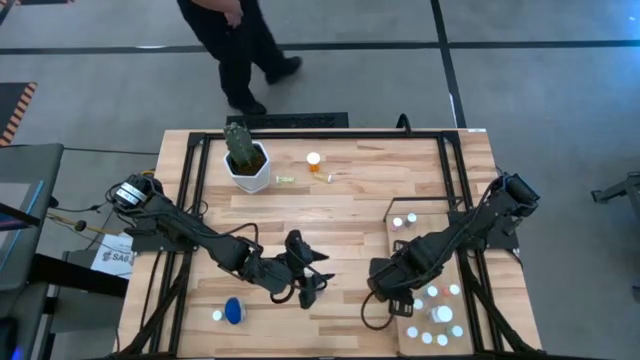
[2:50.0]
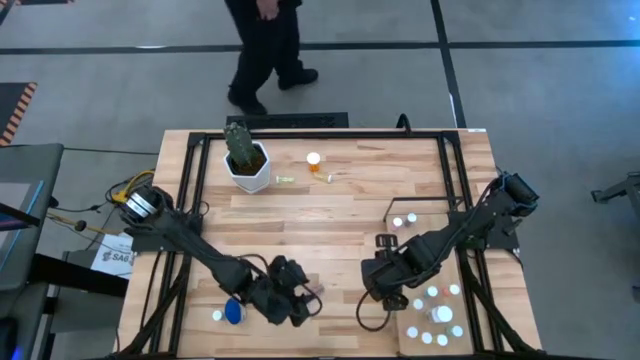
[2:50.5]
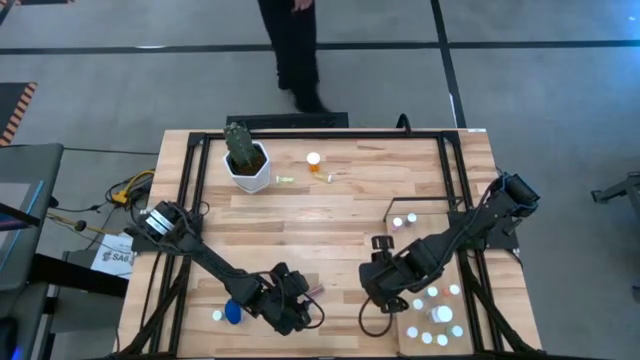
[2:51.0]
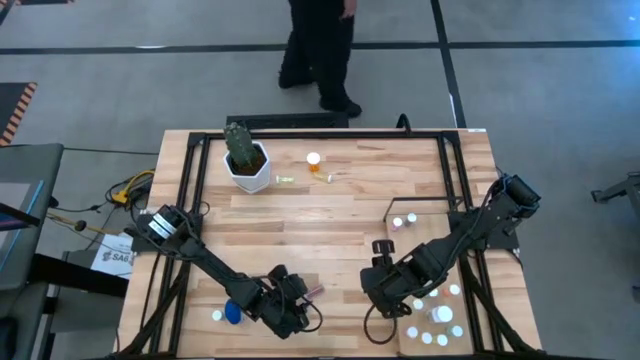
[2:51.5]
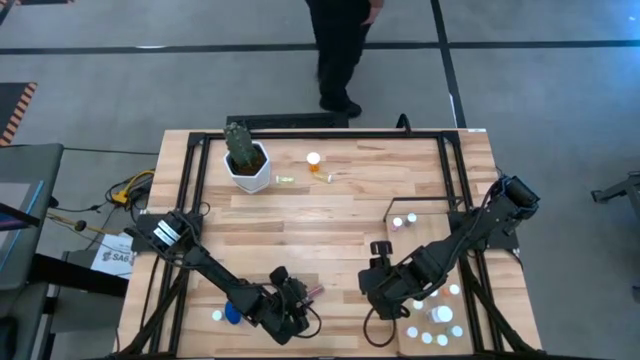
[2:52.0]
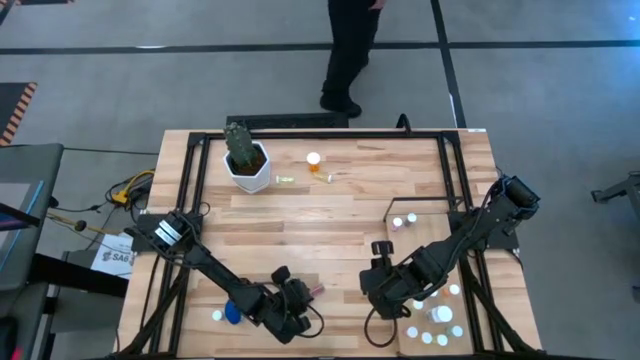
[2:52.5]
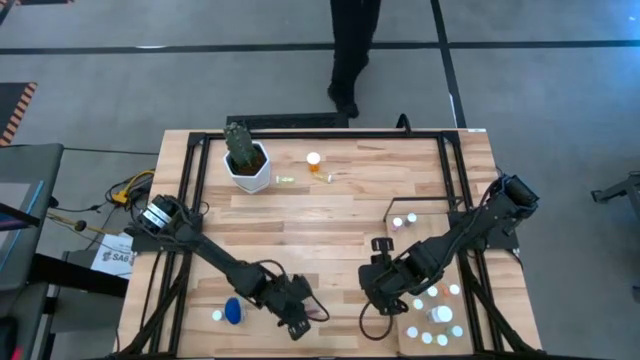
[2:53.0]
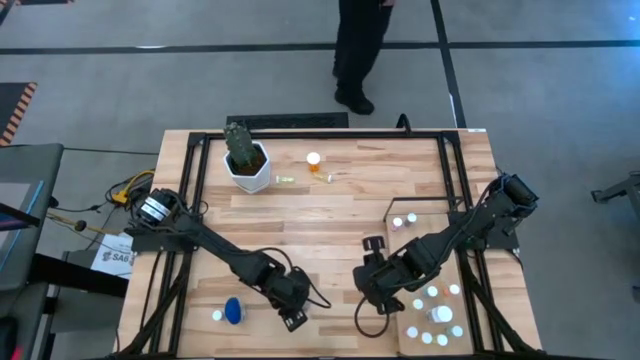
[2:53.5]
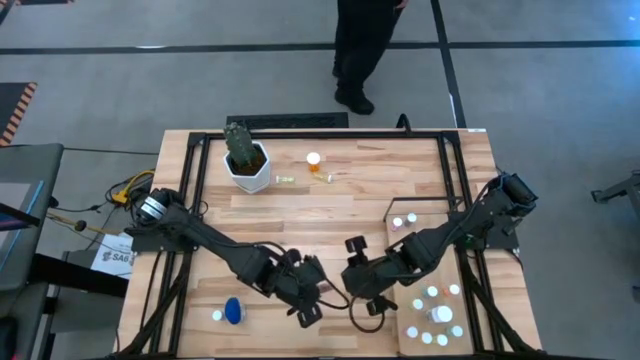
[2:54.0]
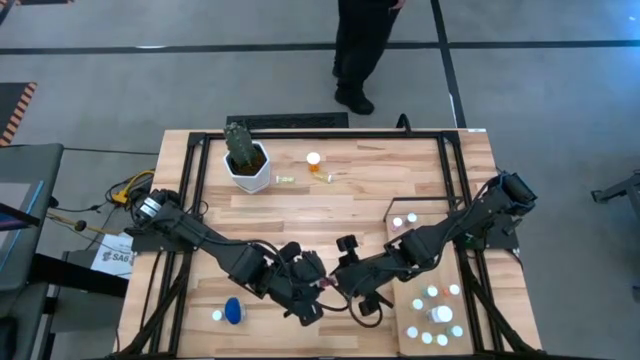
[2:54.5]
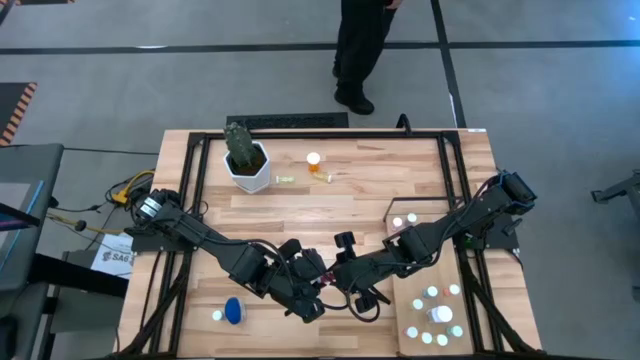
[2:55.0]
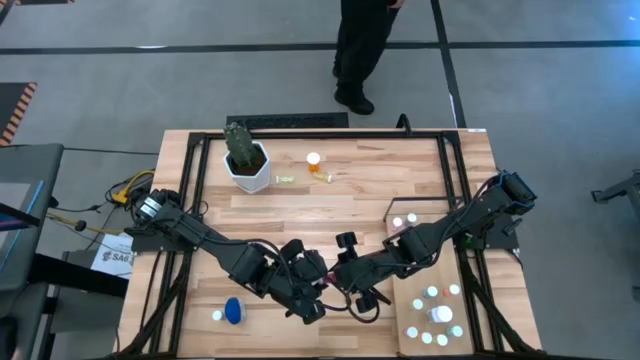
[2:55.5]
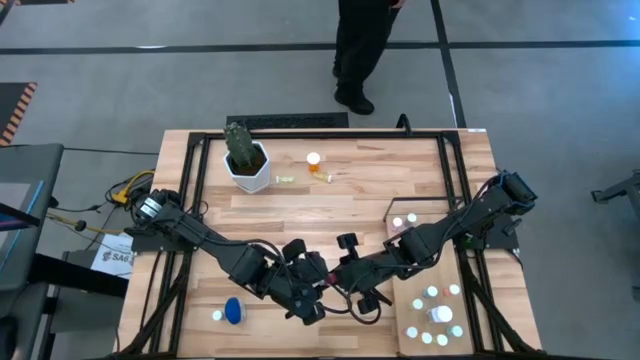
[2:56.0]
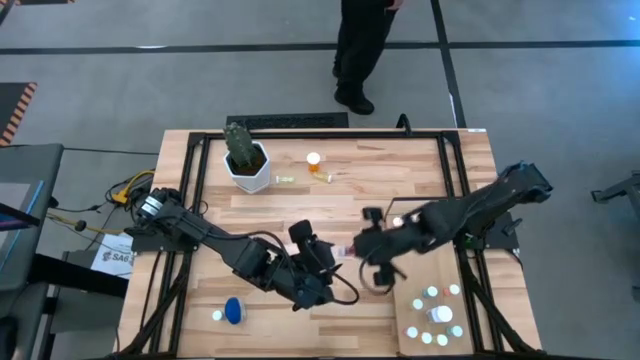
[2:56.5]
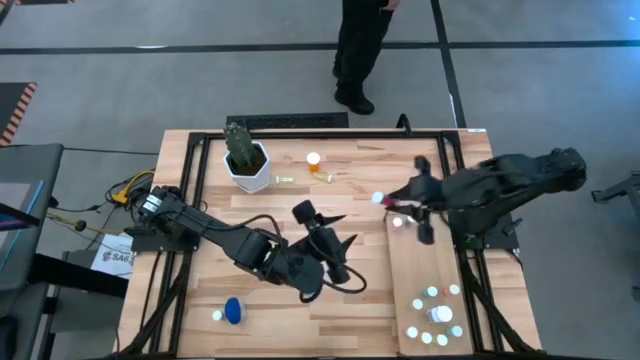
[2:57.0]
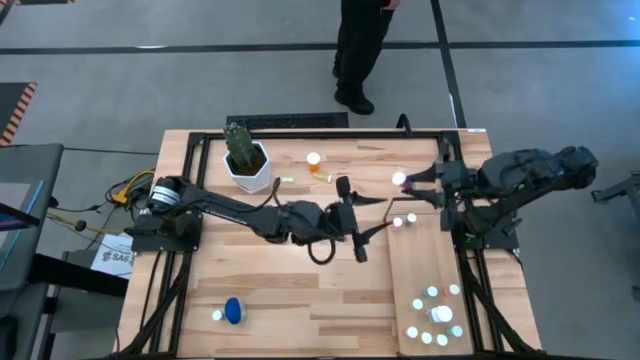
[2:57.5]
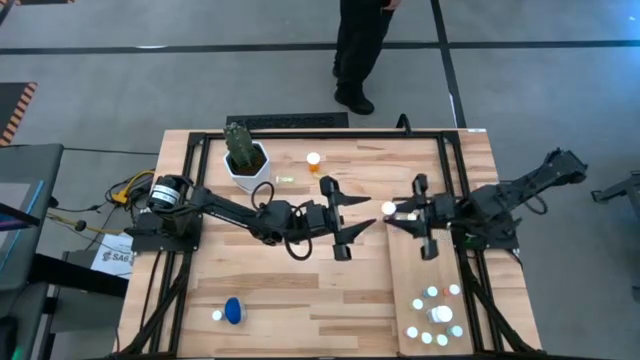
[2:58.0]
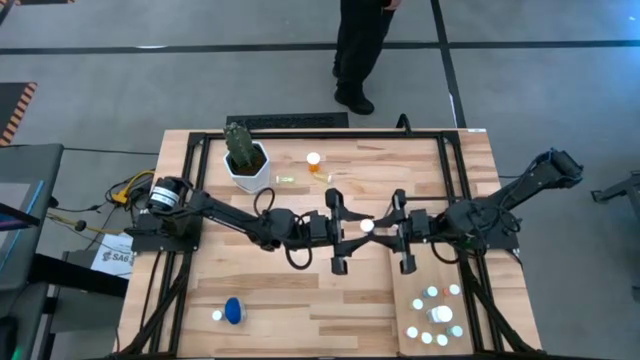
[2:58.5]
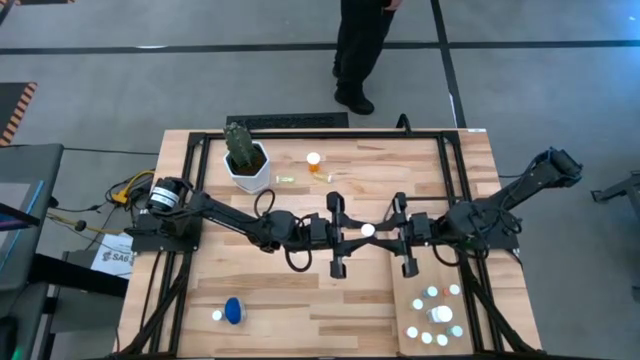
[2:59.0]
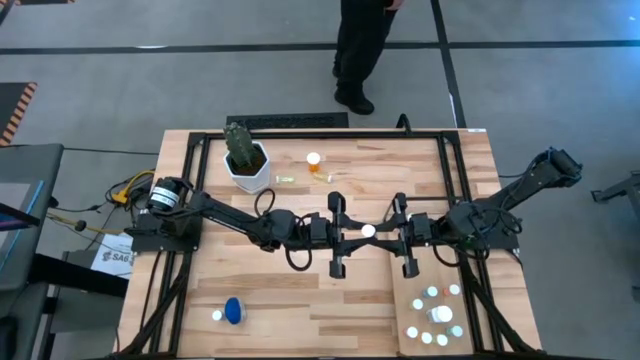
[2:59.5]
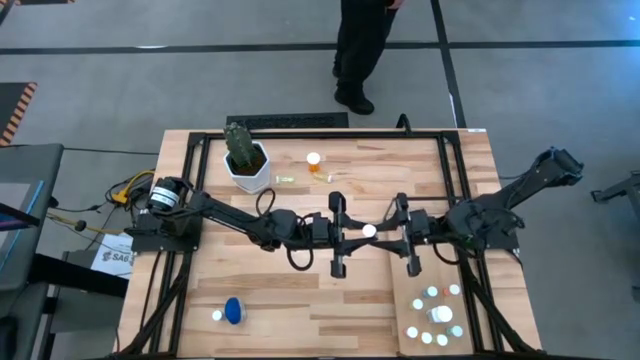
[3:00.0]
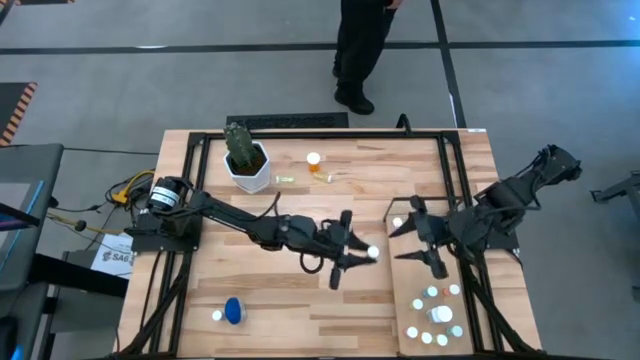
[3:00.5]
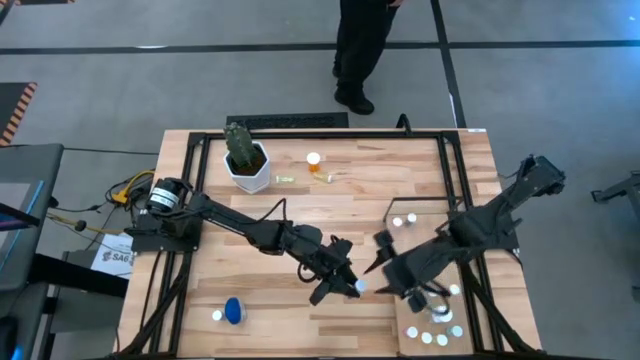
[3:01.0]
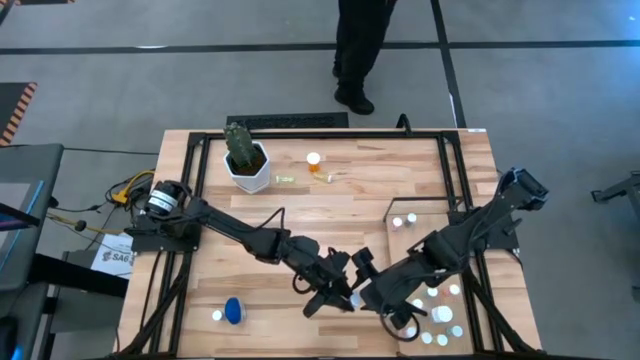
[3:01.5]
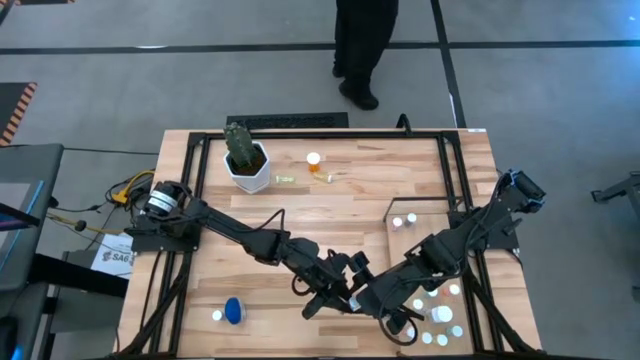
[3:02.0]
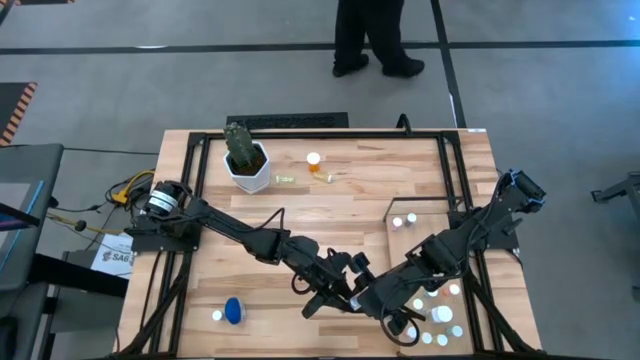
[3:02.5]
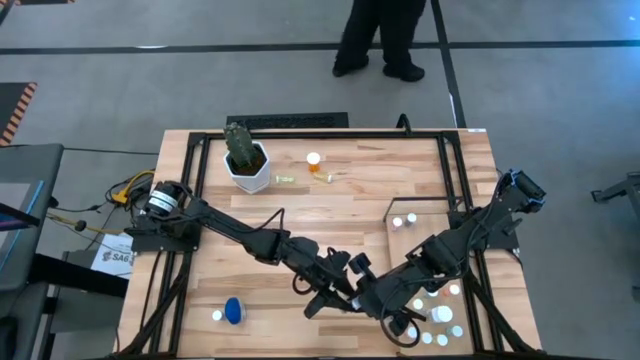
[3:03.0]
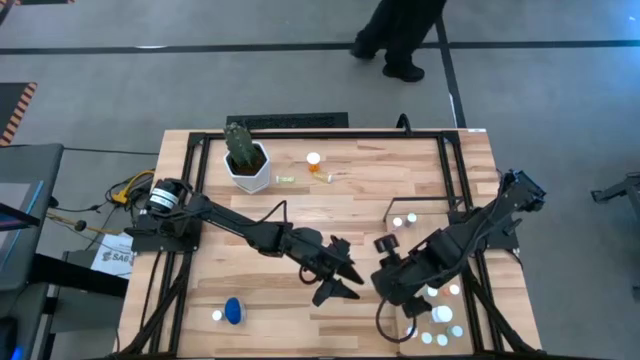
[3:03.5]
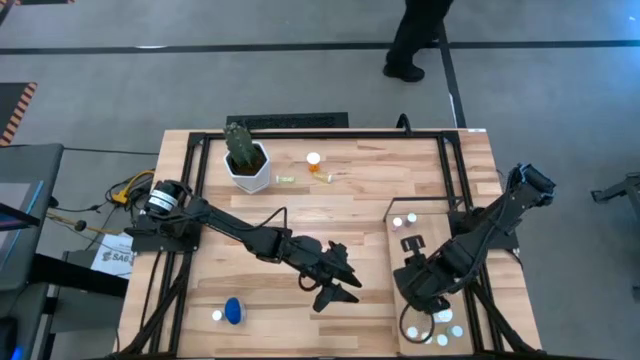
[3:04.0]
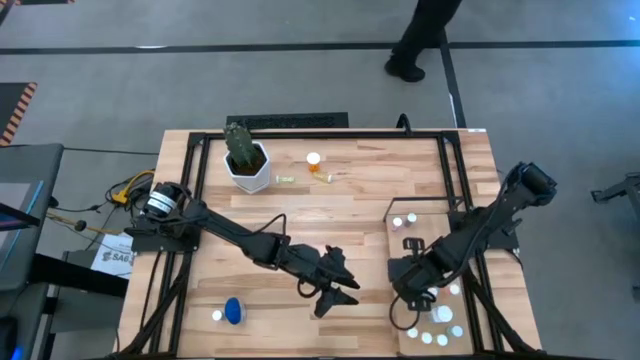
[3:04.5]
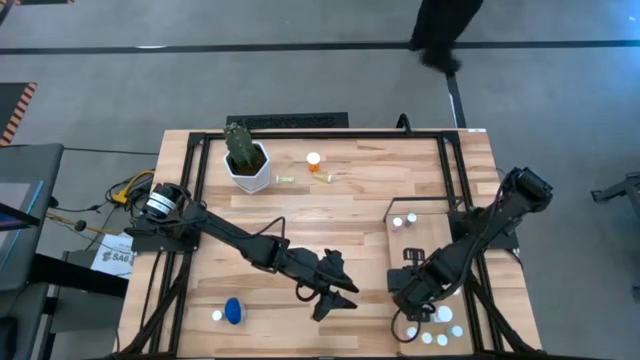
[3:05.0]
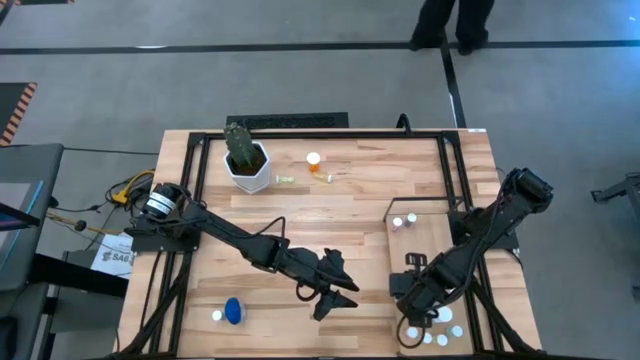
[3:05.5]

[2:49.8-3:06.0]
Task: Pick and place medicine bottles onto shelf by color
Put the blue pill bottle on the shelf

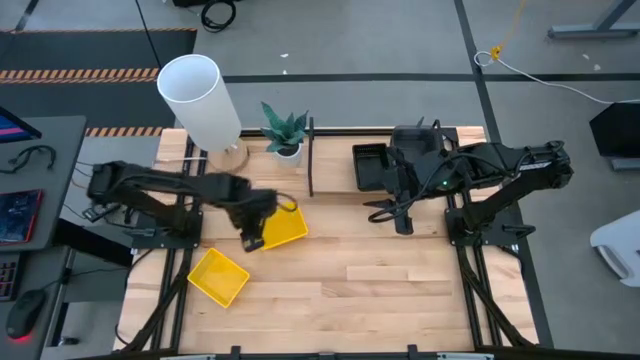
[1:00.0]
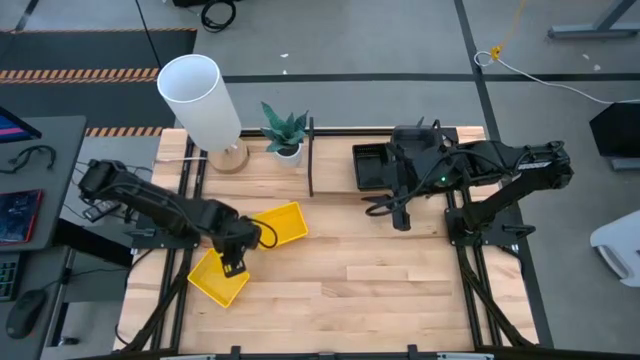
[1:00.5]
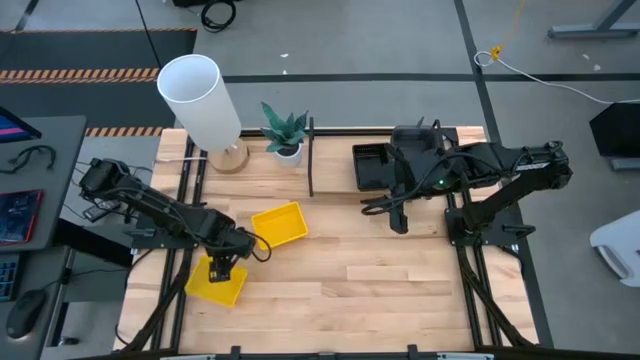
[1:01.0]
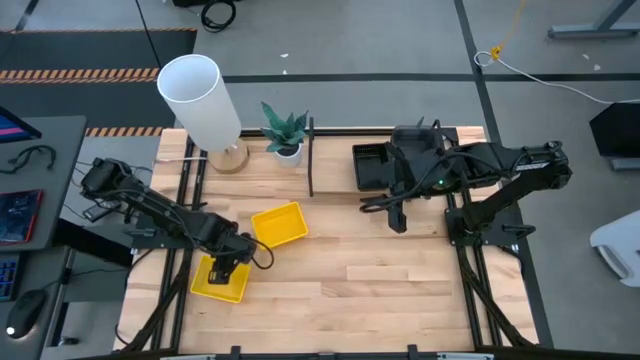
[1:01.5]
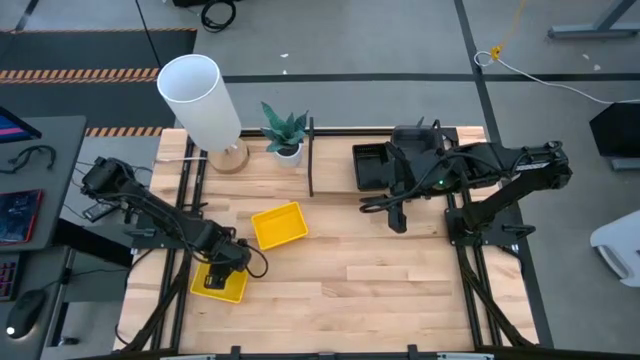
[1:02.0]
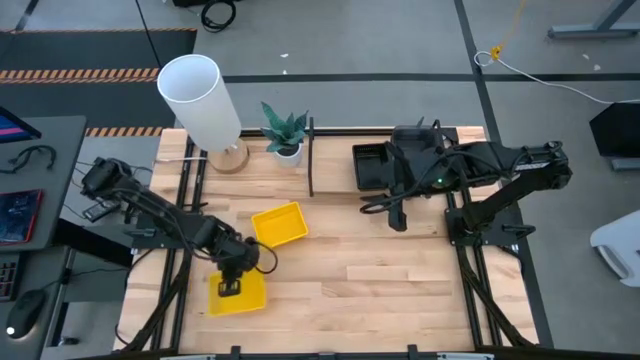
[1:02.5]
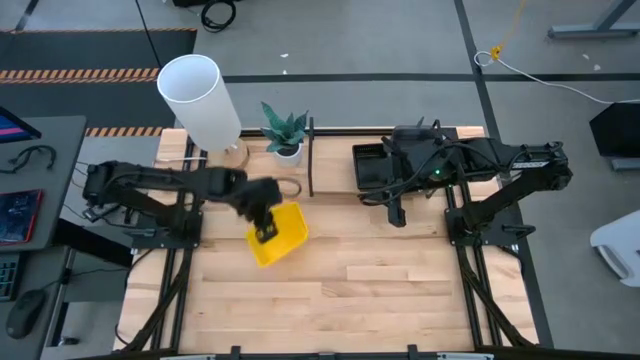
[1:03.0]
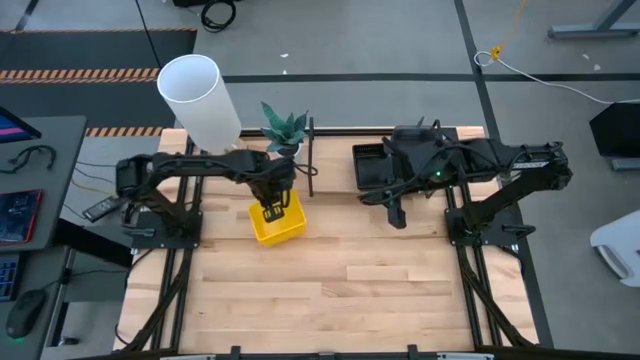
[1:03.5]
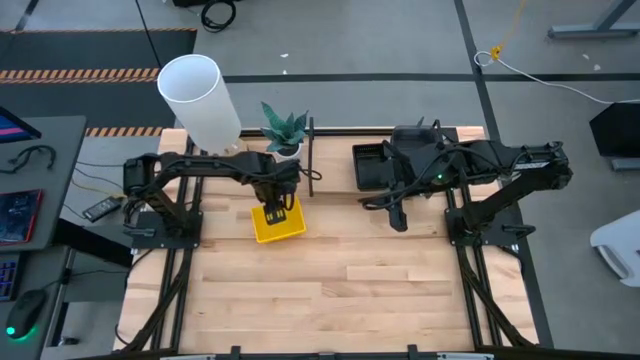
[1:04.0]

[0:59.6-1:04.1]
Task: Stack baskets on shelf by color
Stack the bottom yellow basket on top of the top yellow bin
